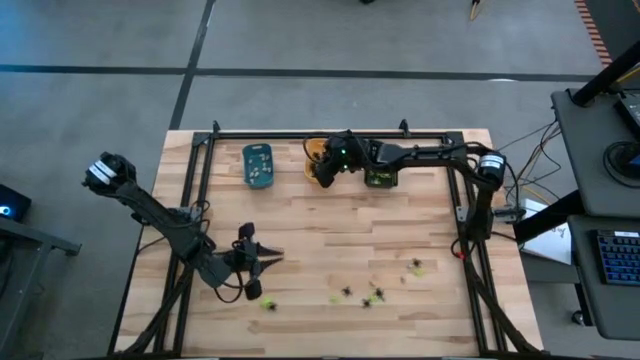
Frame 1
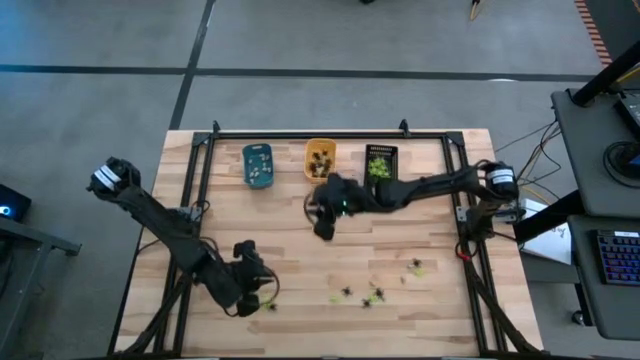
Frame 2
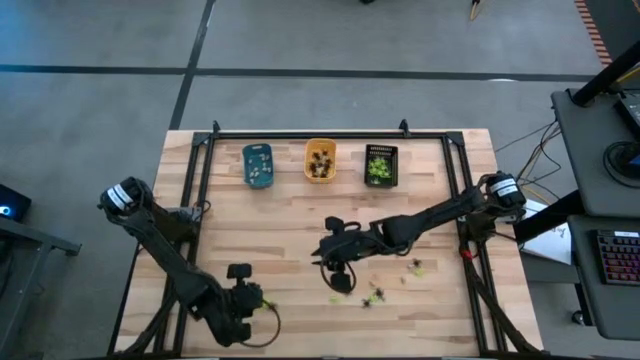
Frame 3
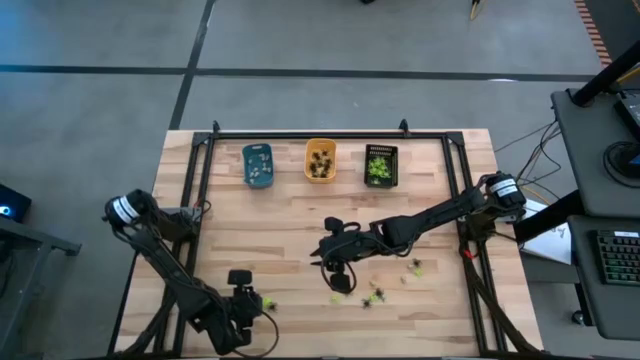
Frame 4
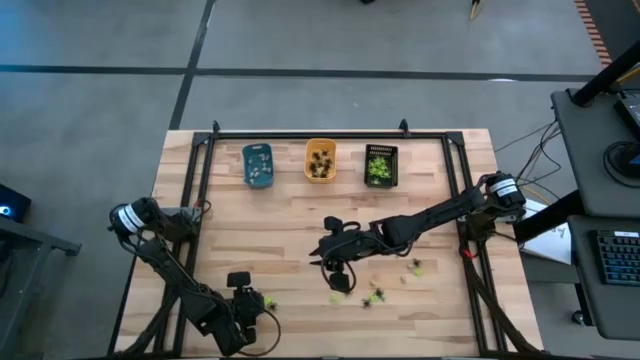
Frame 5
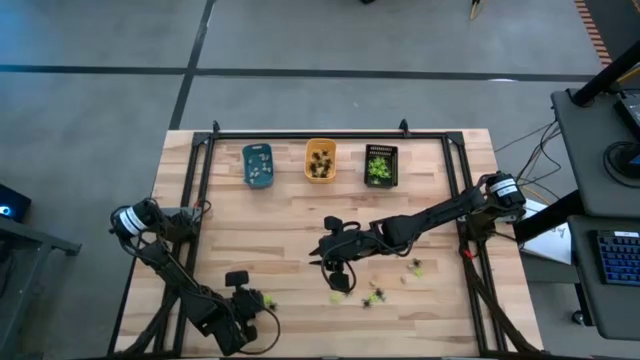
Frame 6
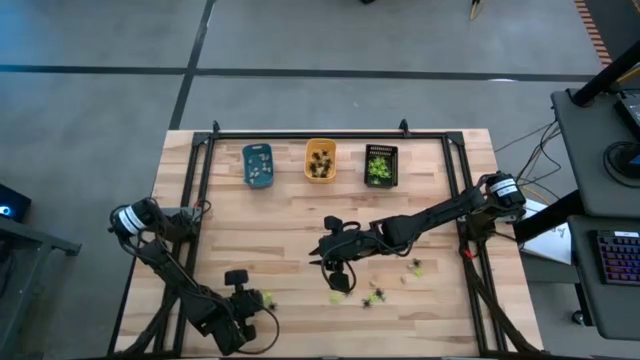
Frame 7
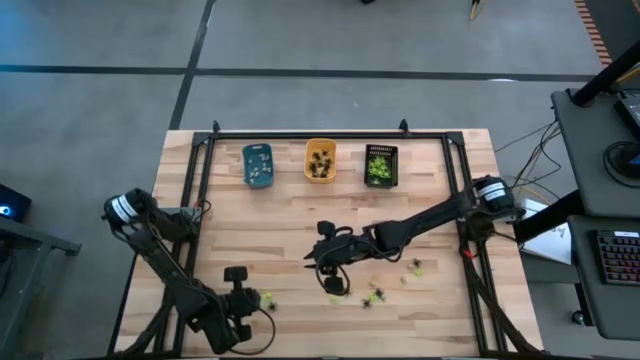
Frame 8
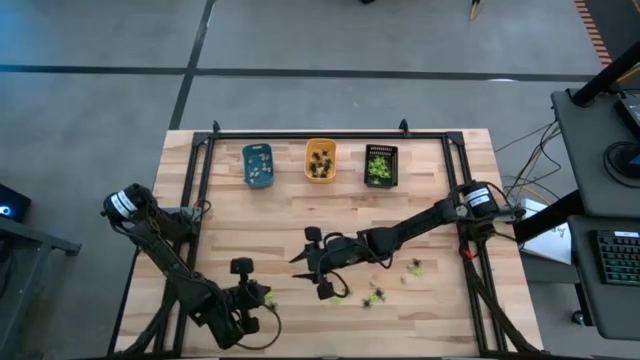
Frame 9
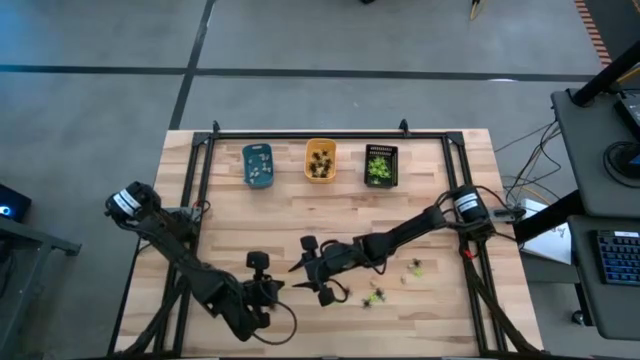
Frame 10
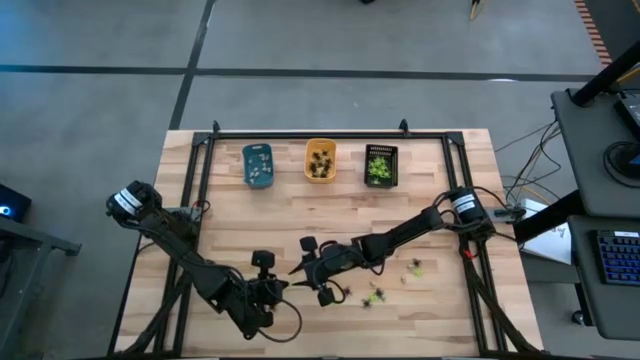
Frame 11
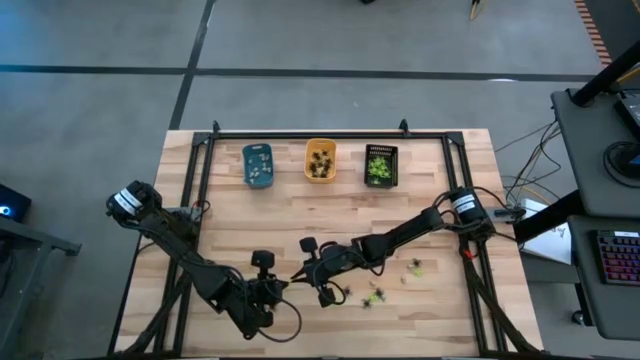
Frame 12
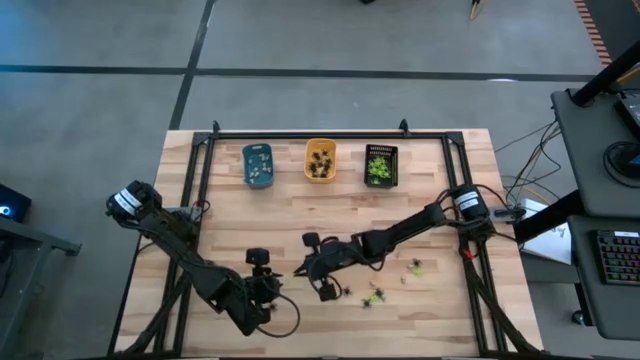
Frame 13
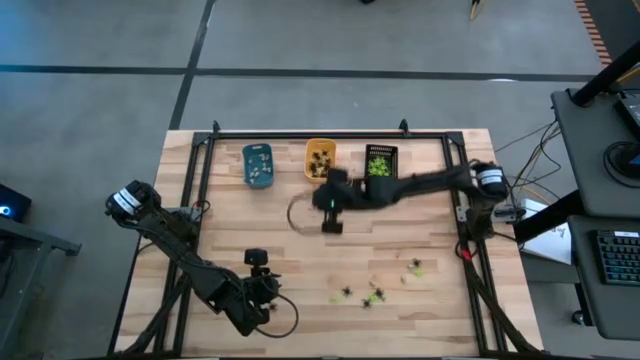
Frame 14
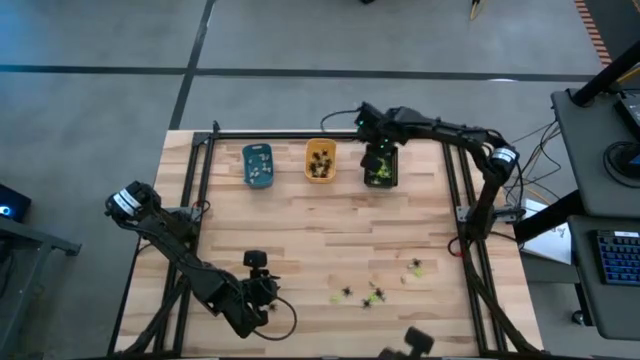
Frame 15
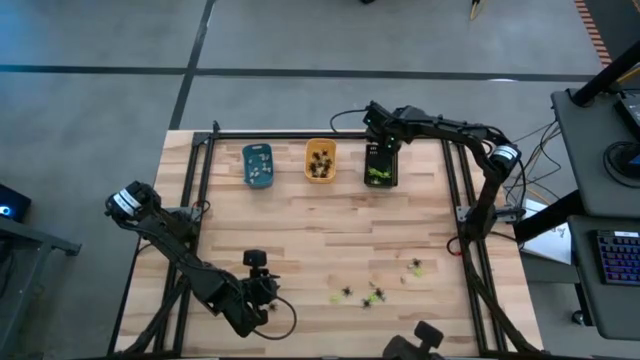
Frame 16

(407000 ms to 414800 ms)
Task: Sort Halloween decoration
Put the green spider toy into the black bin

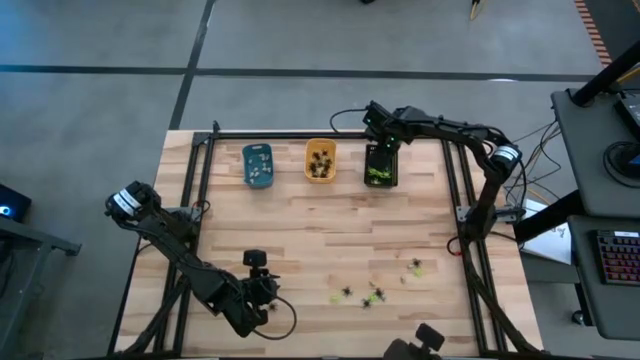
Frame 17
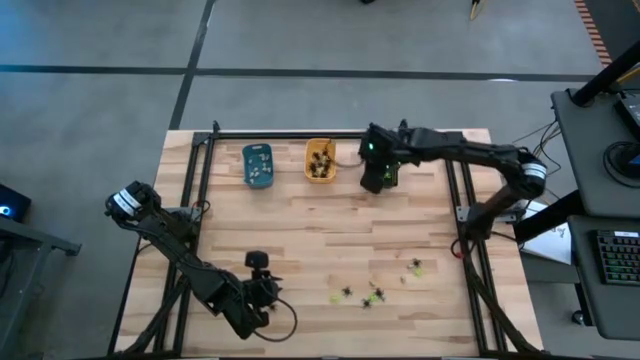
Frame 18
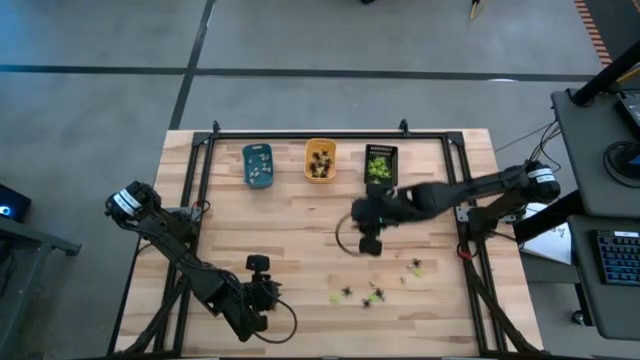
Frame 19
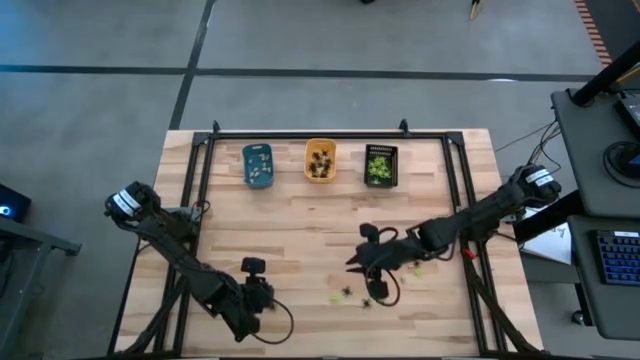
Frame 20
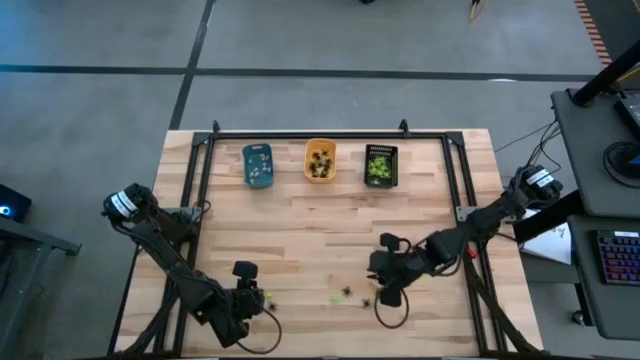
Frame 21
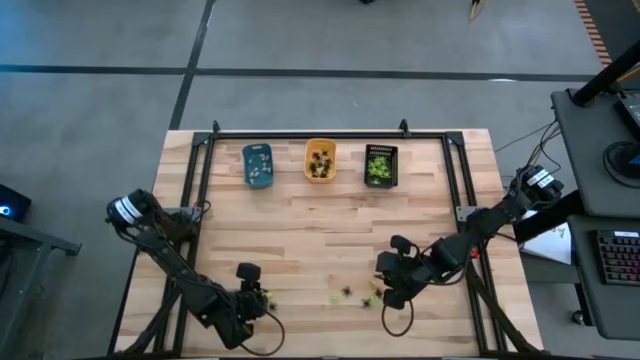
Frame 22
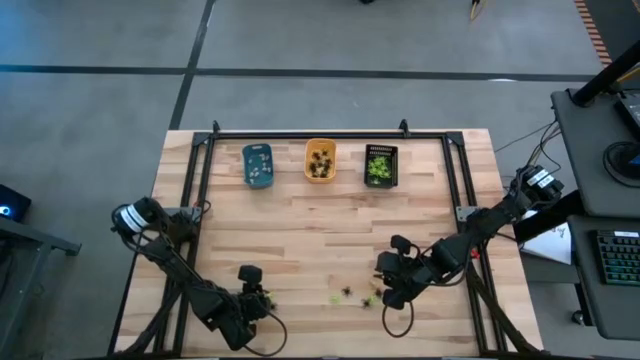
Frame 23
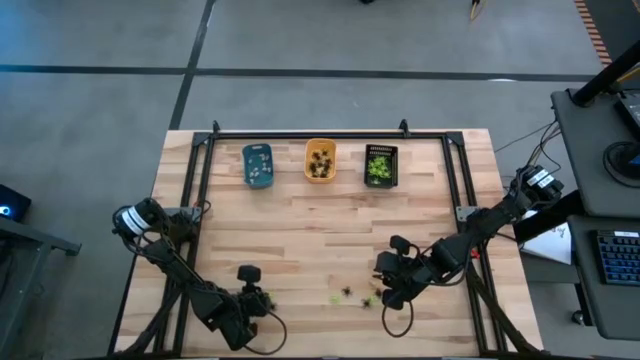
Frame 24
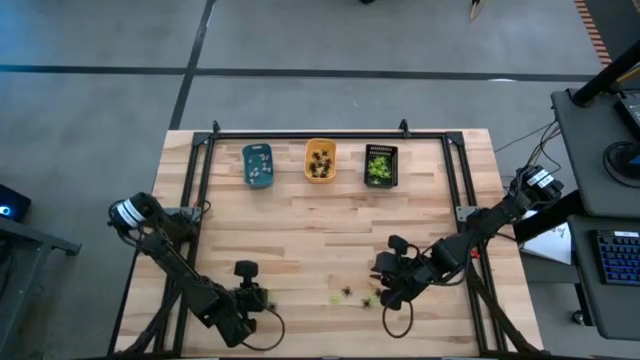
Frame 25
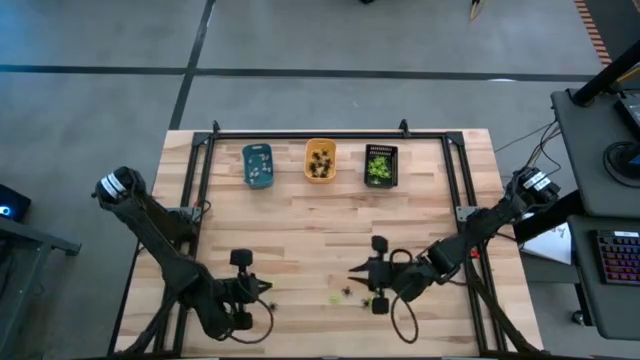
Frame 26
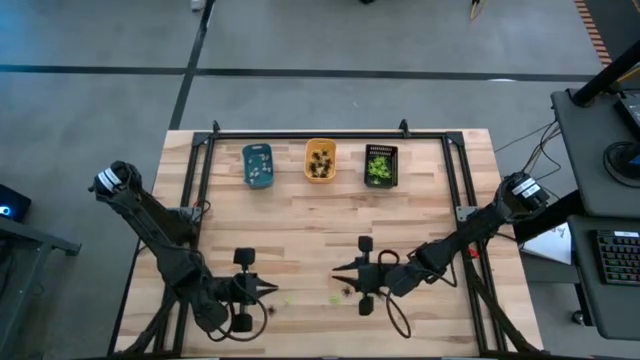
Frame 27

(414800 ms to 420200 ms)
Put the green spider toy into the black bin

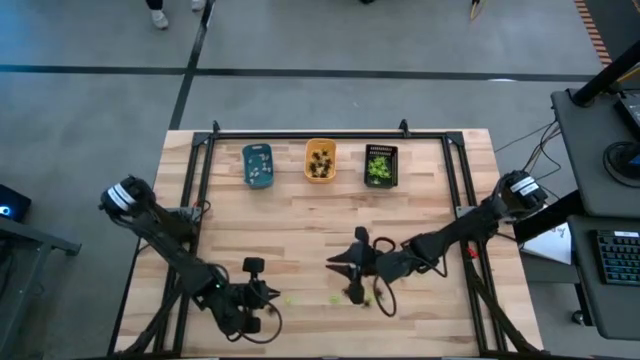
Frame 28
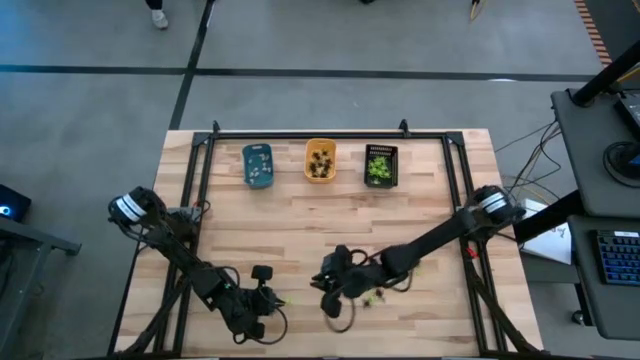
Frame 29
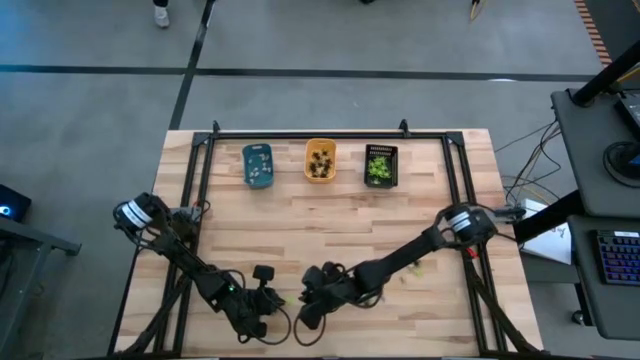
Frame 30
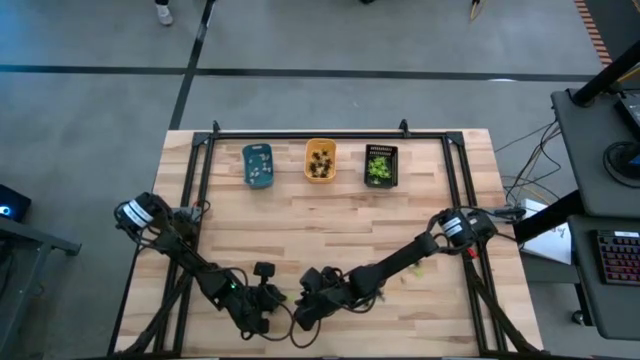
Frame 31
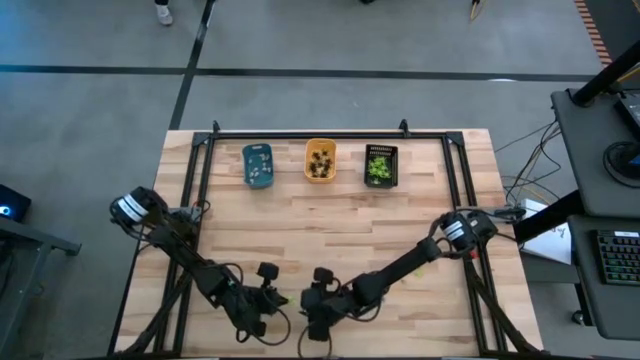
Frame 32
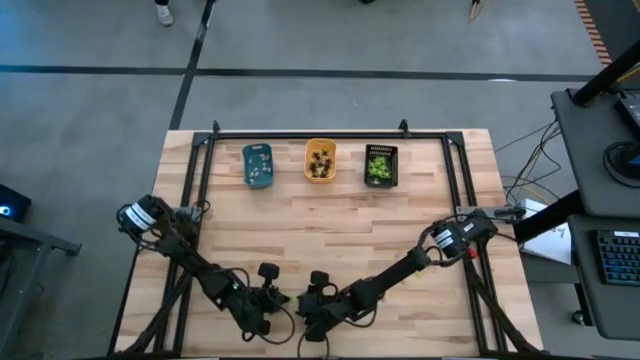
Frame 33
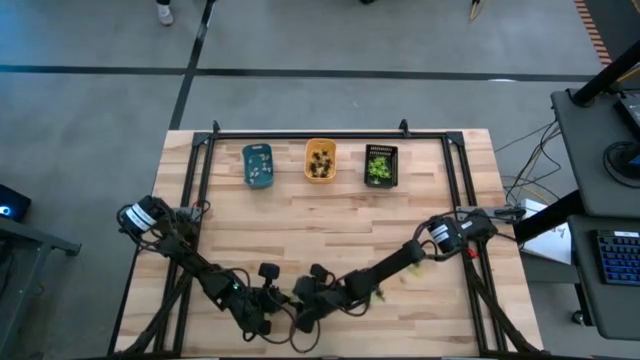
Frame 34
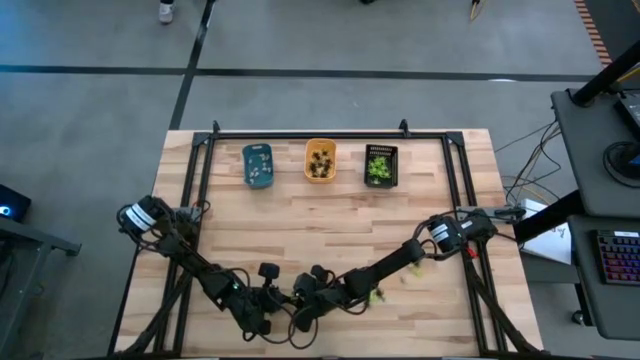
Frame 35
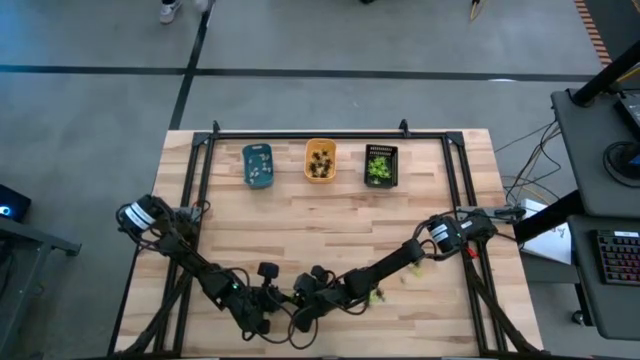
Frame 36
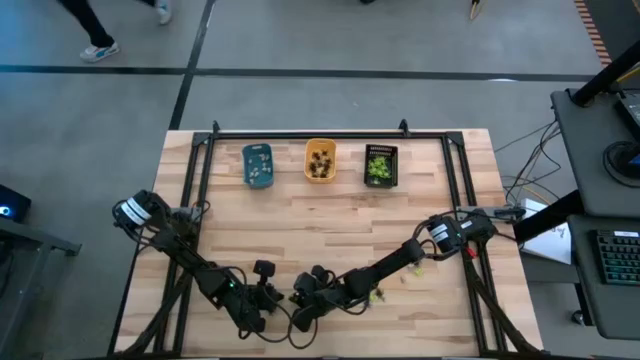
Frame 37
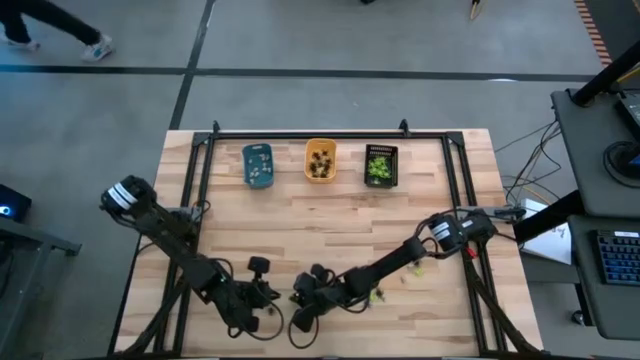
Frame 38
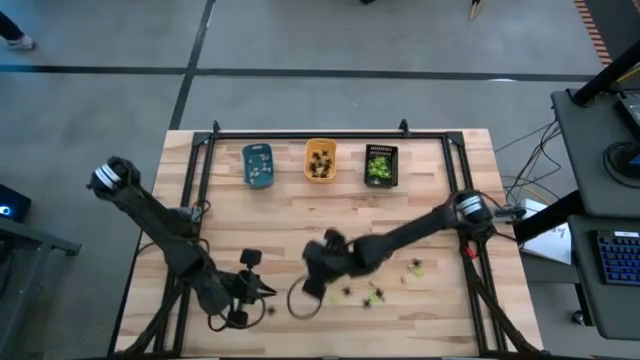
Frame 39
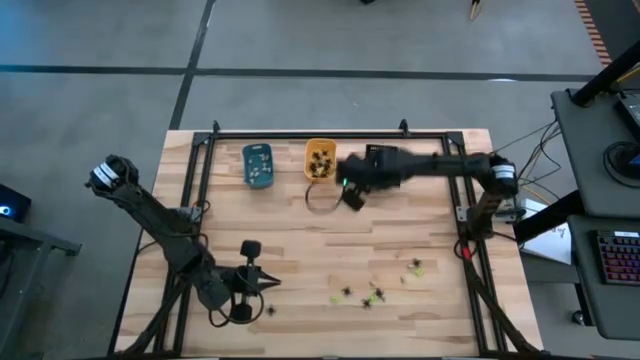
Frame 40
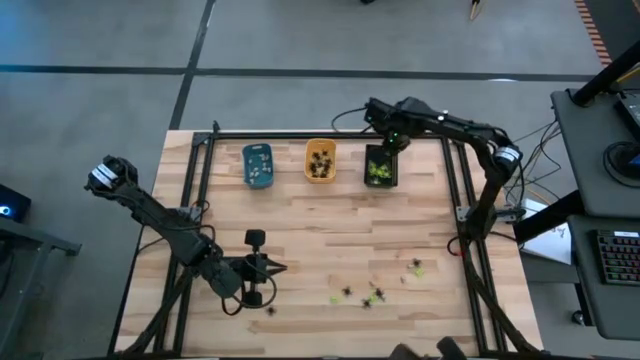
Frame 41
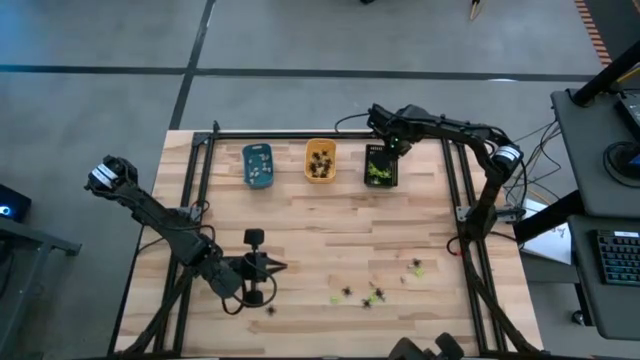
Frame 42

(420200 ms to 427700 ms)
Put the green spider toy into the black bin
